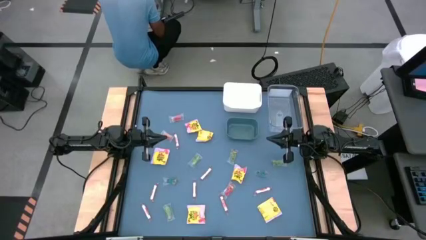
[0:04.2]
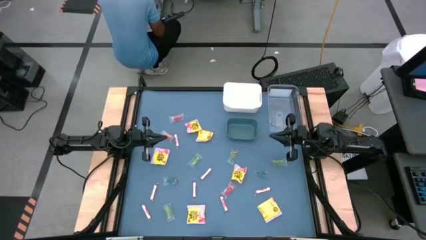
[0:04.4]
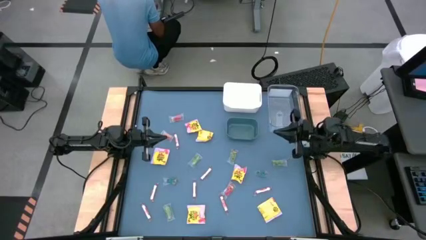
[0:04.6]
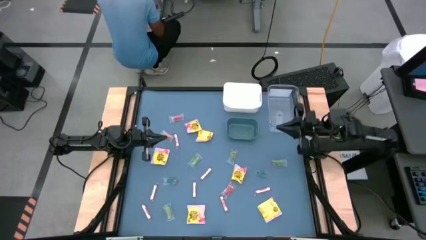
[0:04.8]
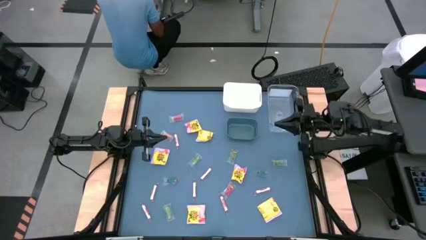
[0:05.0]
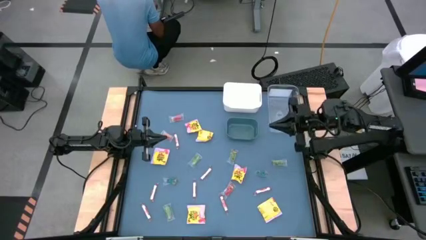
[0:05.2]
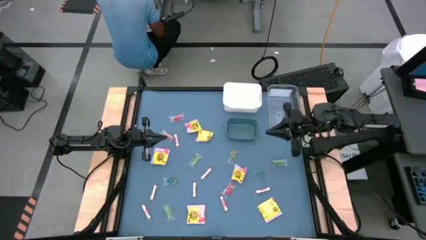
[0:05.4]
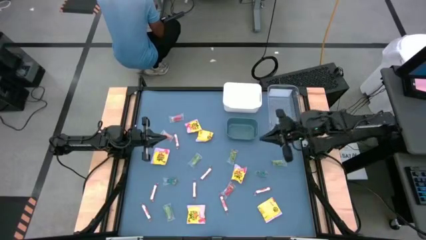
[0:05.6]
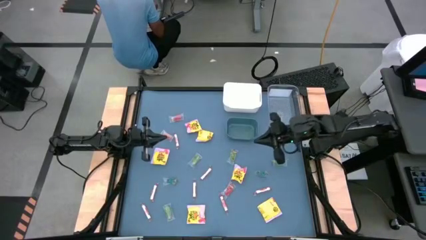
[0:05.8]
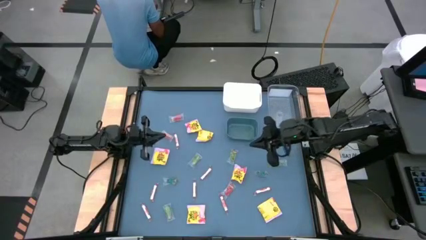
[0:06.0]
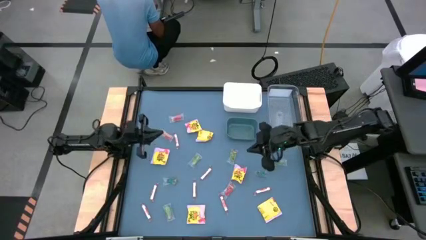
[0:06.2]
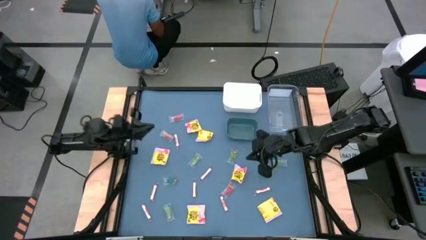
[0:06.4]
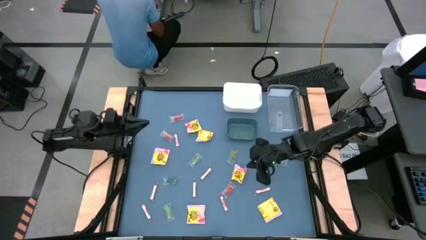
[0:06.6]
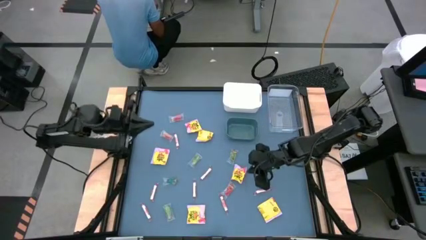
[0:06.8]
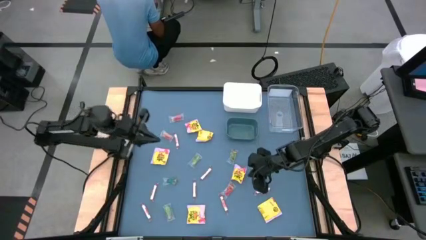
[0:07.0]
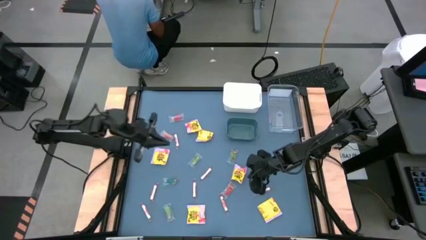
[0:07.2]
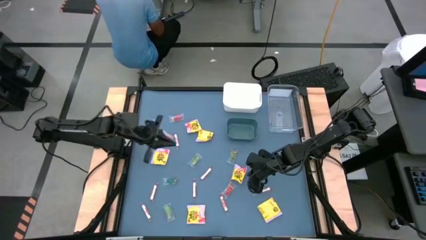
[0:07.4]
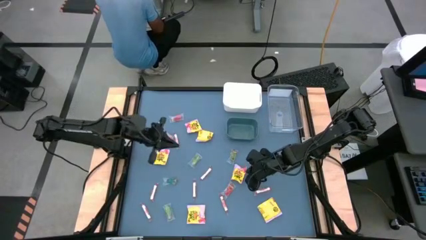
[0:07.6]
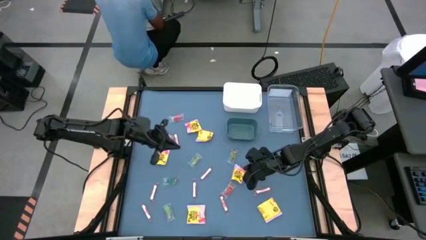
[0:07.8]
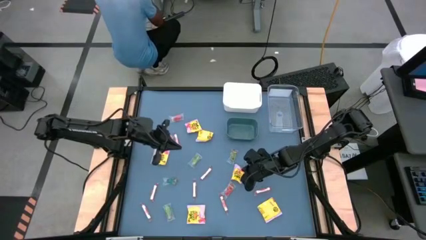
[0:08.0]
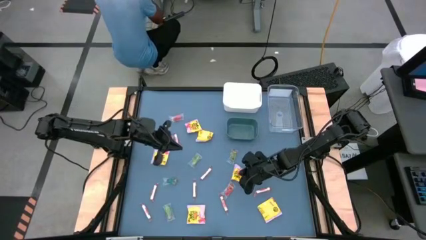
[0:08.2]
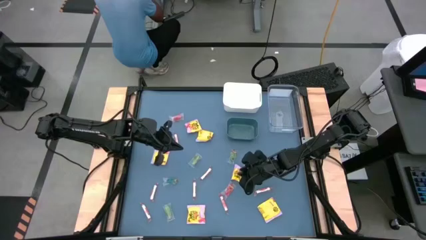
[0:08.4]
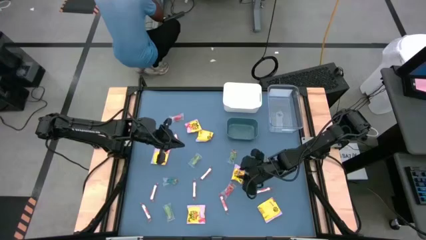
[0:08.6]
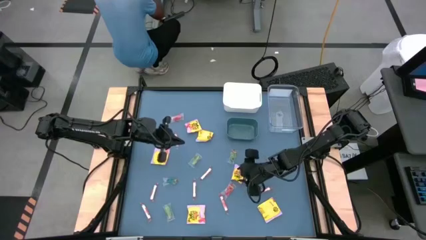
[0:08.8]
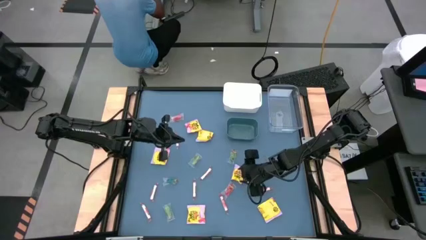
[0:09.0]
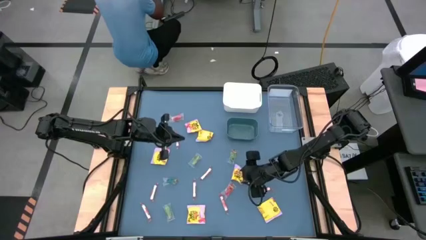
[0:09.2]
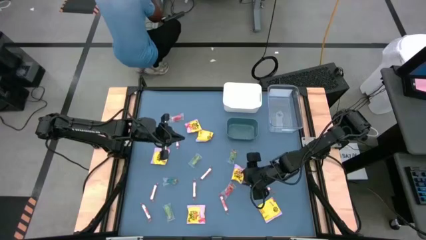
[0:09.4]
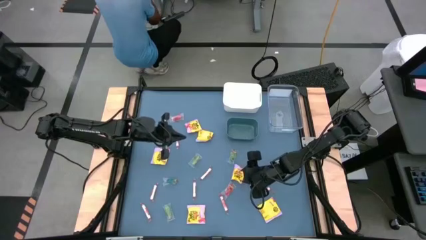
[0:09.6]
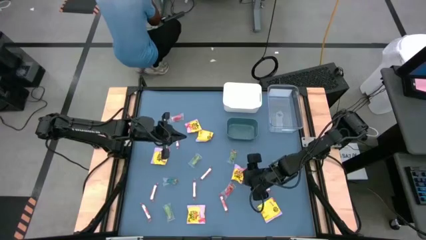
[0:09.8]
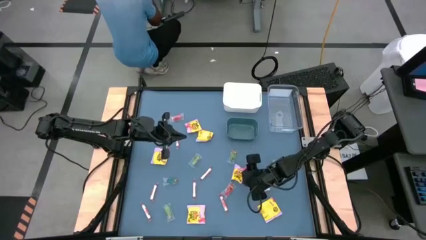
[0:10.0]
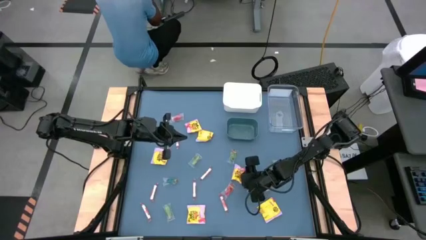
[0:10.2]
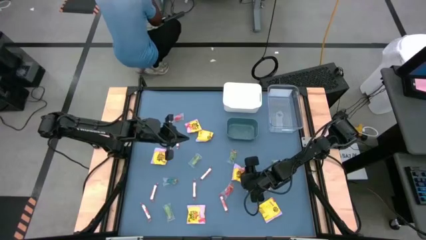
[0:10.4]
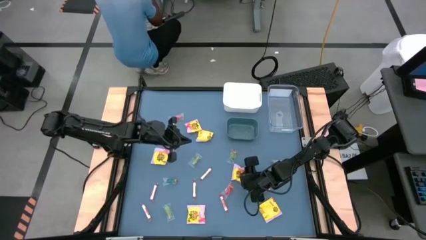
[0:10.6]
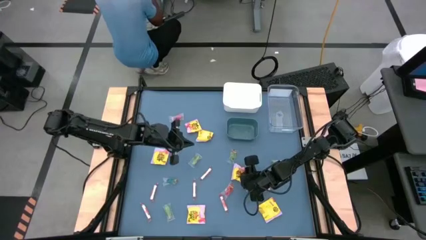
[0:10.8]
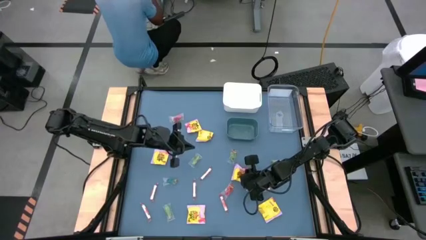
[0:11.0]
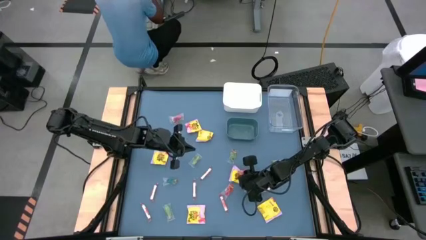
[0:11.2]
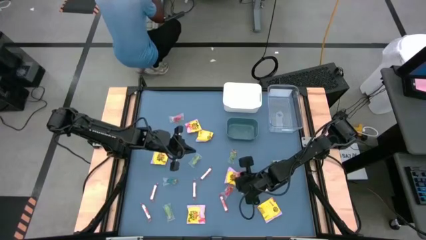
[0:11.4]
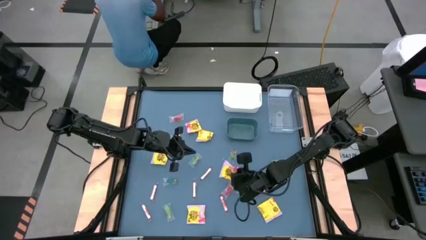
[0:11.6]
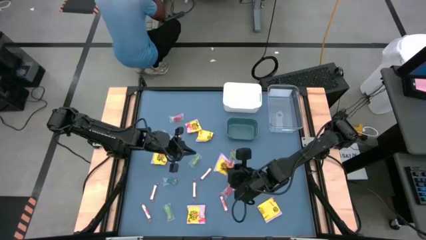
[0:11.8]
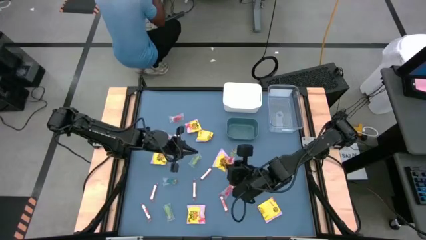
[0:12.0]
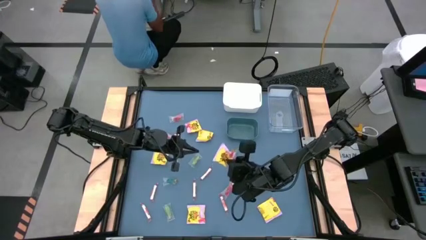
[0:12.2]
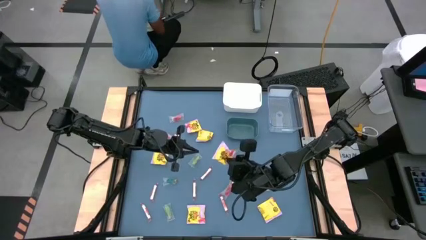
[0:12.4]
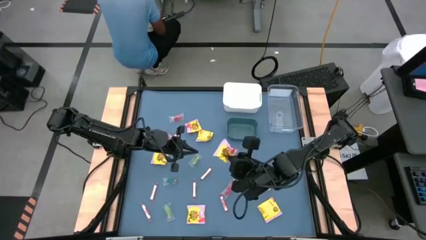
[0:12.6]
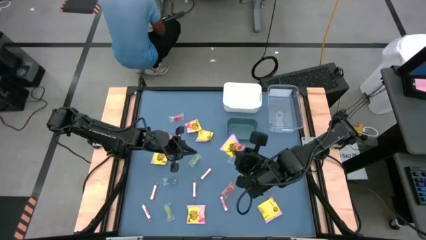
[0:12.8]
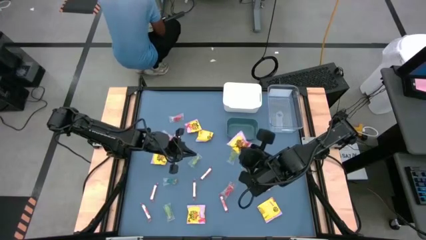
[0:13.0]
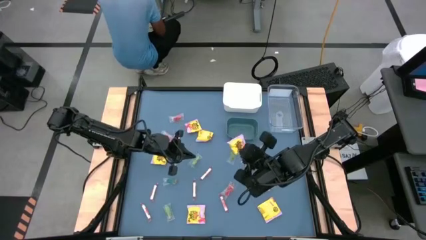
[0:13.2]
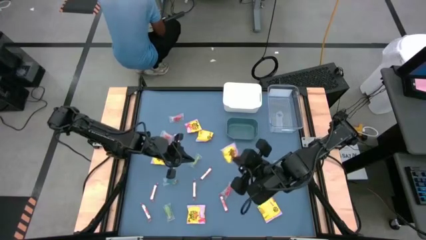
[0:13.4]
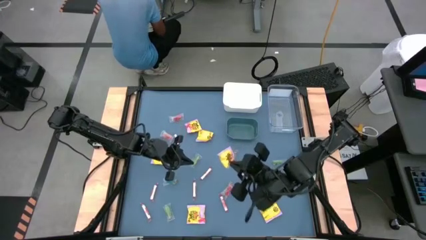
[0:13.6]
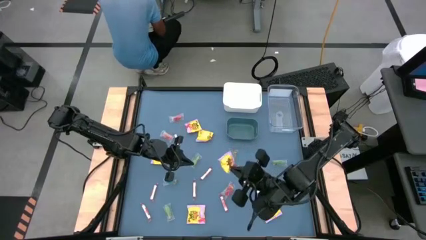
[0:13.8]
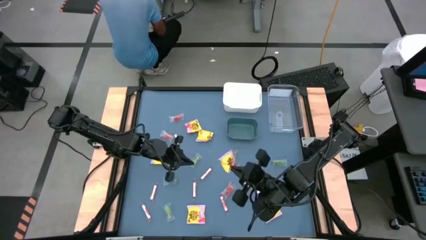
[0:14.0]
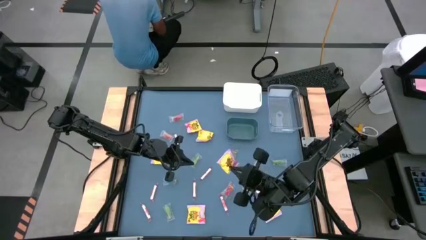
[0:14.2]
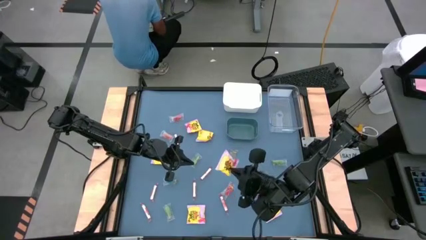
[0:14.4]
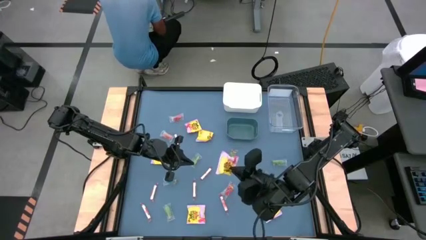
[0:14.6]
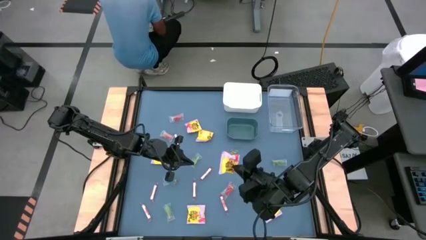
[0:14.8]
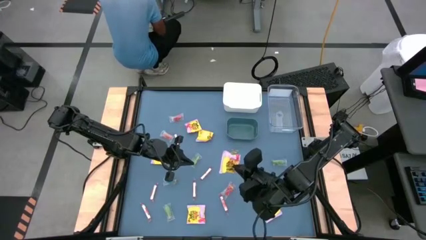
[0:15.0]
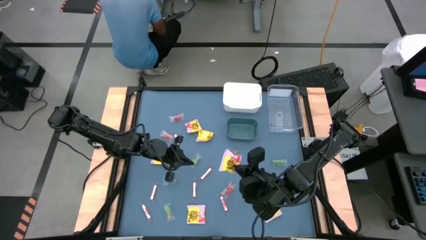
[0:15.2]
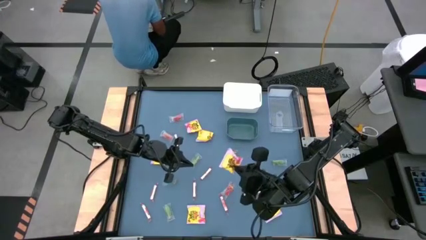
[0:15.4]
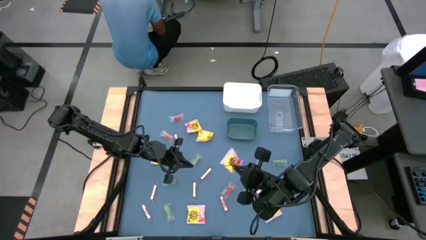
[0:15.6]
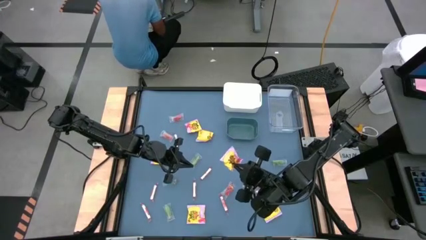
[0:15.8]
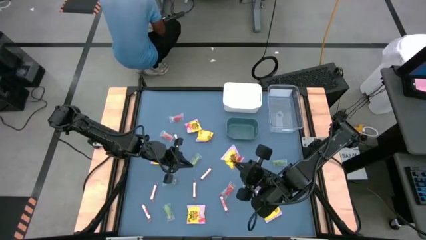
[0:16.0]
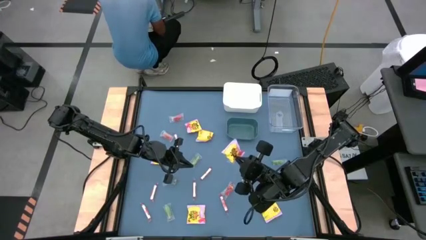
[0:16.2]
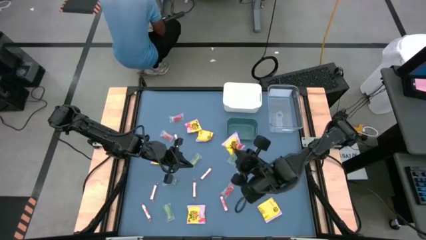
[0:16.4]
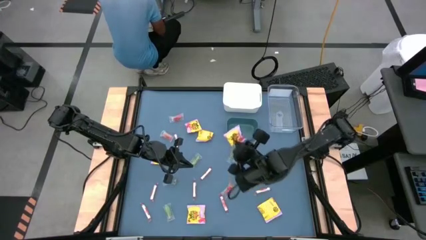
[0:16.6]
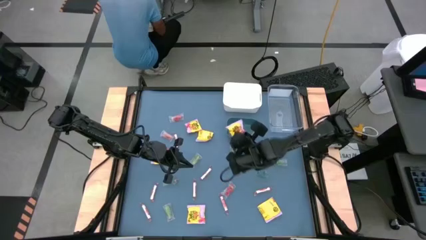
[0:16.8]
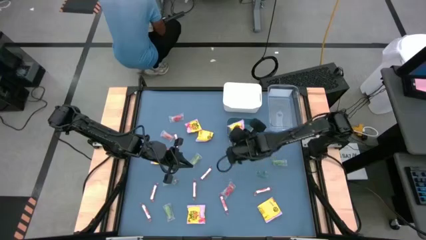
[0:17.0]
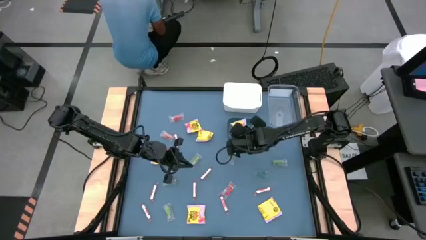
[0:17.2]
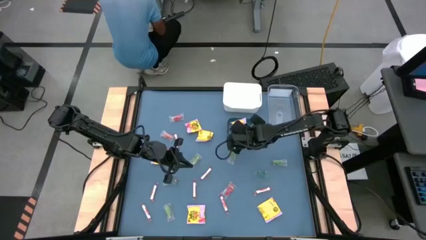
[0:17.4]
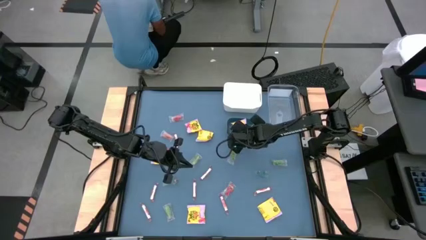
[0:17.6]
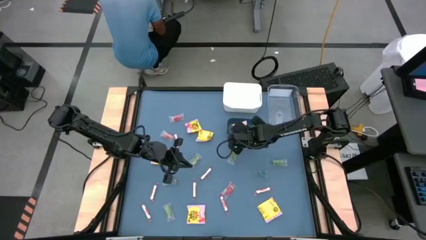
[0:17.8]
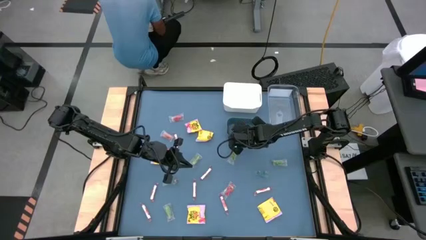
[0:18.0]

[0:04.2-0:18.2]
Task: Sort candy
Put the center yellow candy into the green bin
